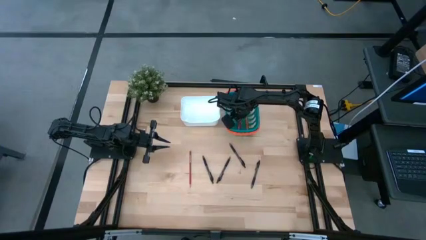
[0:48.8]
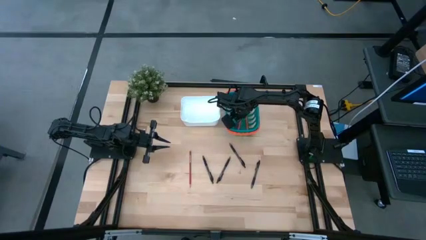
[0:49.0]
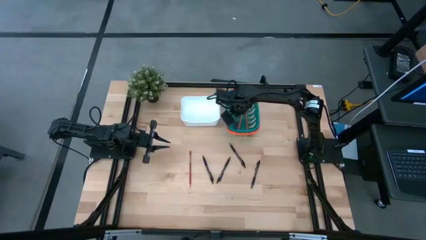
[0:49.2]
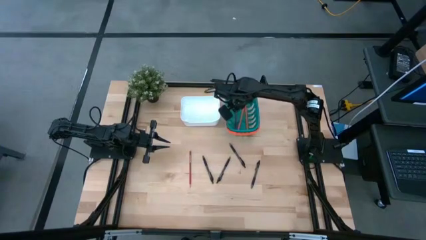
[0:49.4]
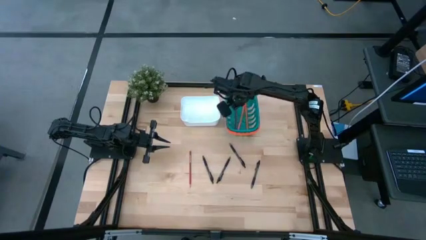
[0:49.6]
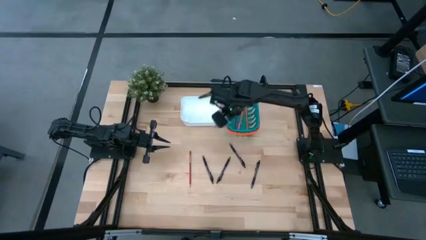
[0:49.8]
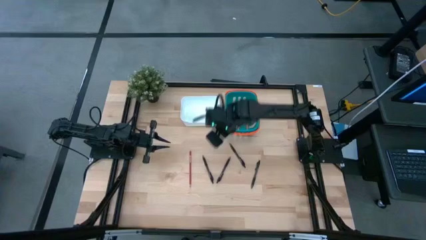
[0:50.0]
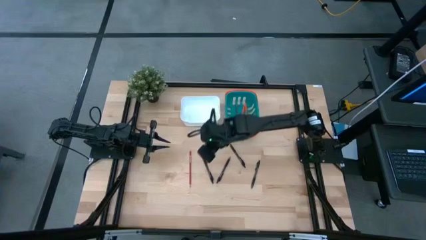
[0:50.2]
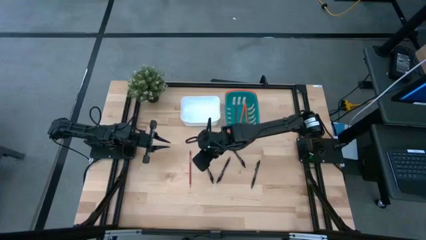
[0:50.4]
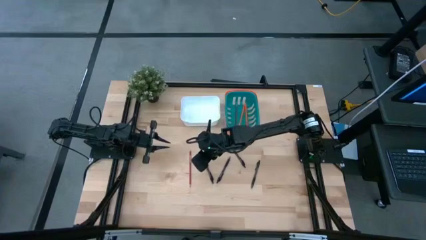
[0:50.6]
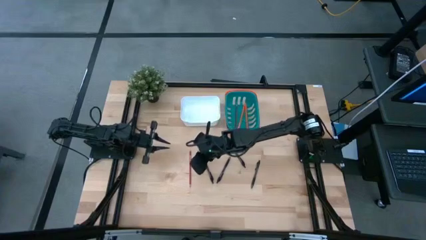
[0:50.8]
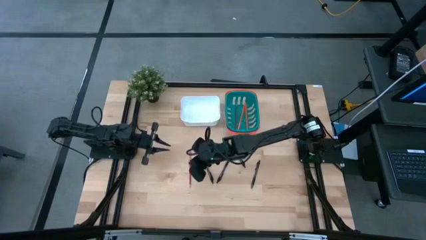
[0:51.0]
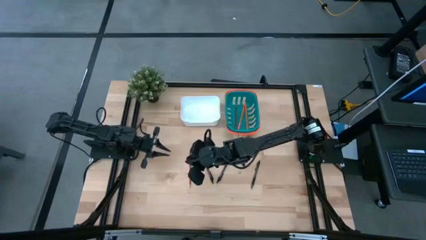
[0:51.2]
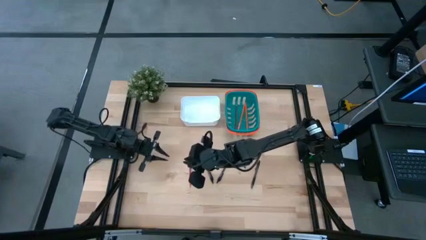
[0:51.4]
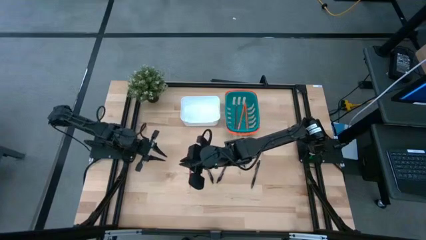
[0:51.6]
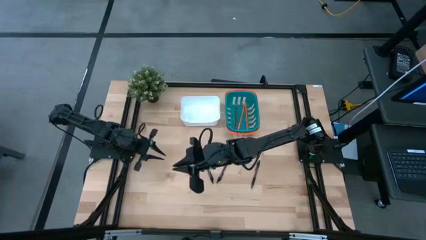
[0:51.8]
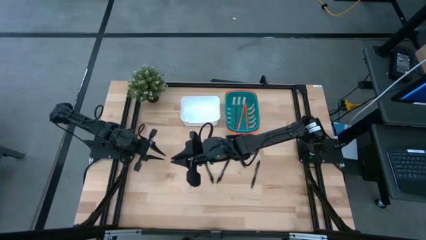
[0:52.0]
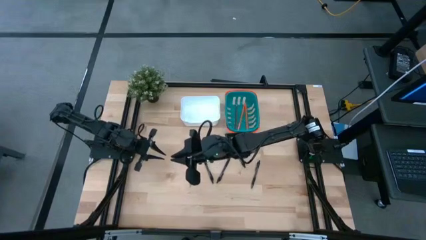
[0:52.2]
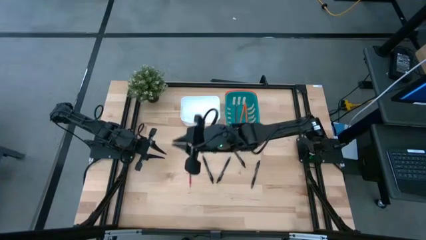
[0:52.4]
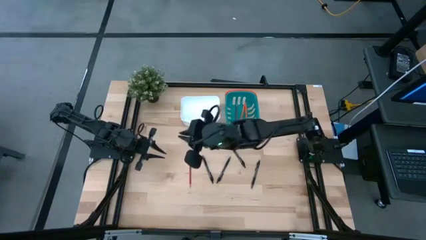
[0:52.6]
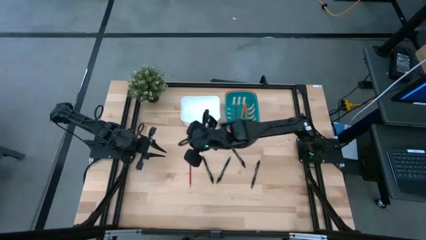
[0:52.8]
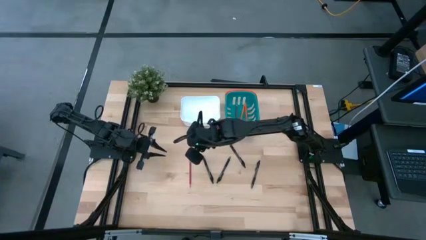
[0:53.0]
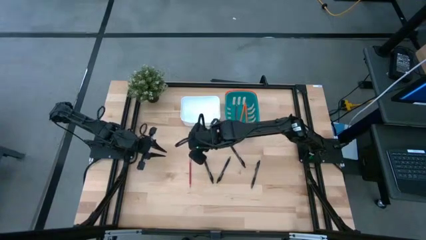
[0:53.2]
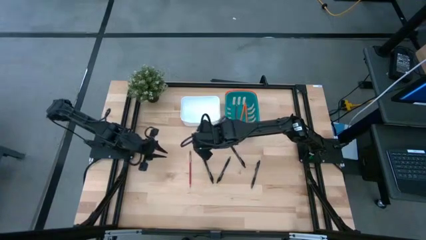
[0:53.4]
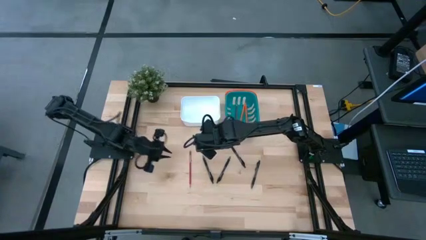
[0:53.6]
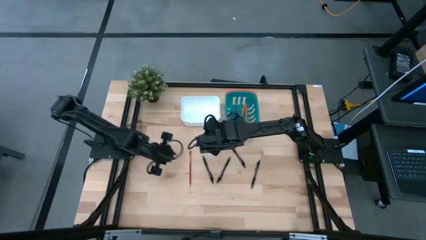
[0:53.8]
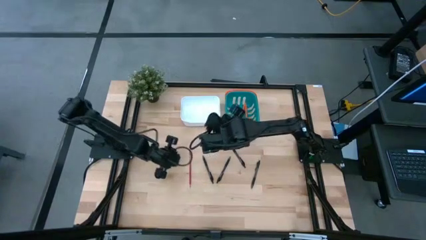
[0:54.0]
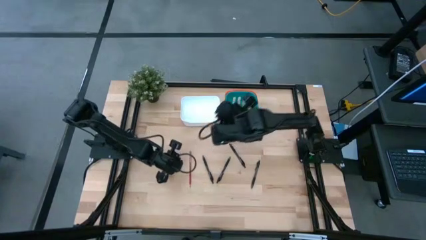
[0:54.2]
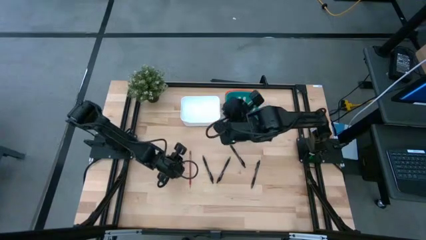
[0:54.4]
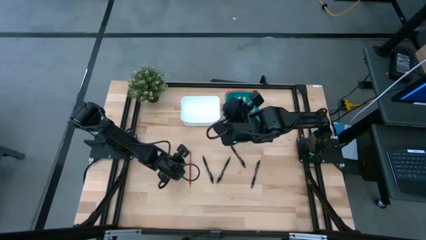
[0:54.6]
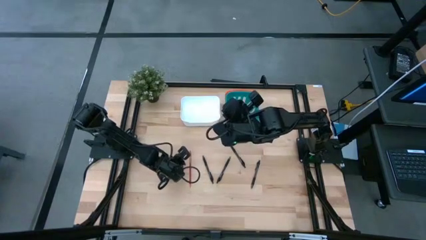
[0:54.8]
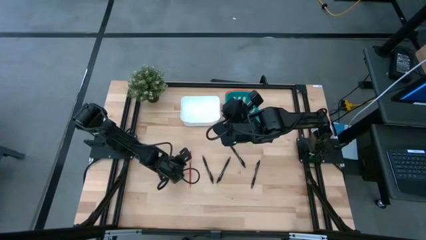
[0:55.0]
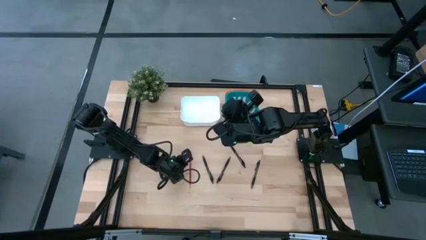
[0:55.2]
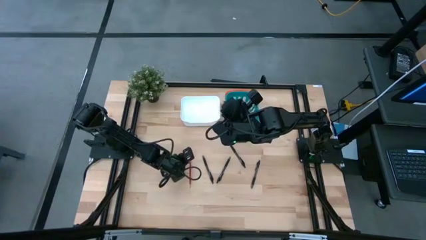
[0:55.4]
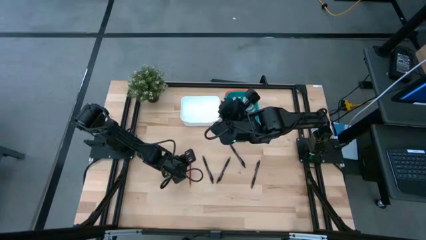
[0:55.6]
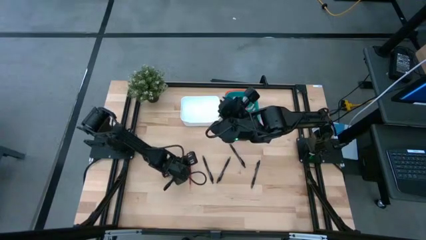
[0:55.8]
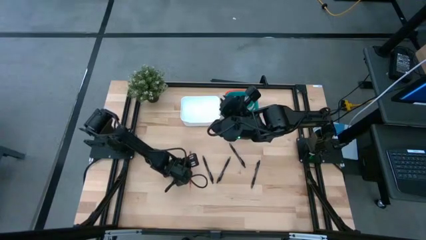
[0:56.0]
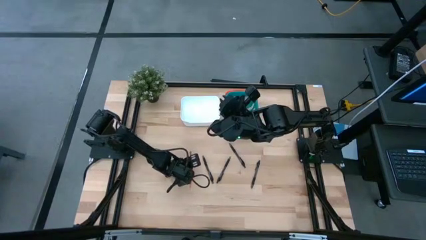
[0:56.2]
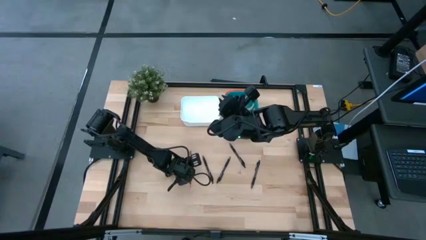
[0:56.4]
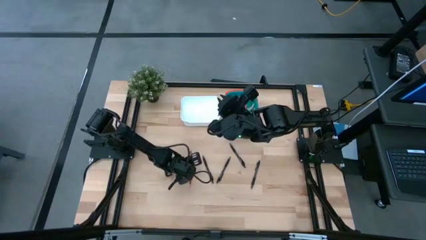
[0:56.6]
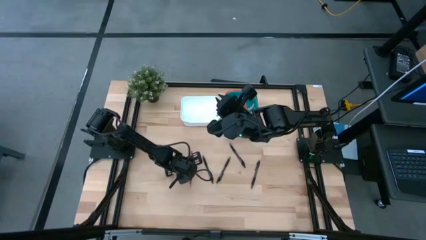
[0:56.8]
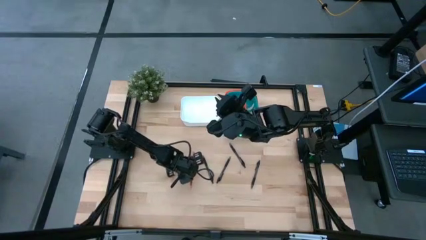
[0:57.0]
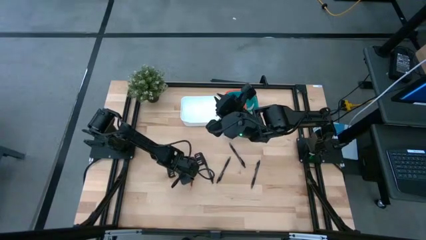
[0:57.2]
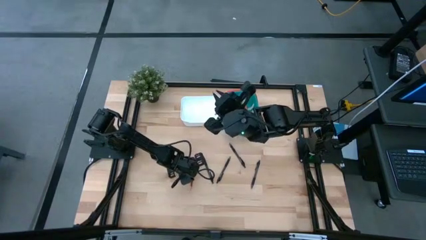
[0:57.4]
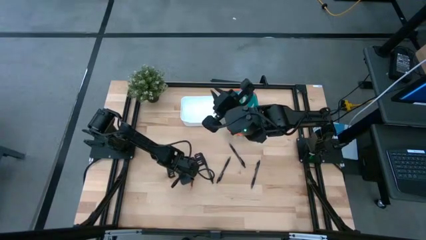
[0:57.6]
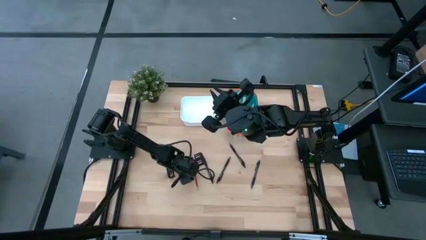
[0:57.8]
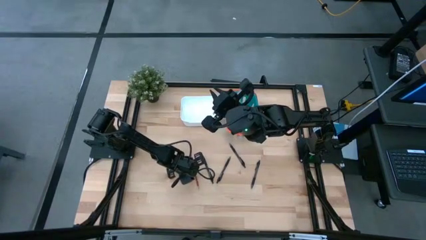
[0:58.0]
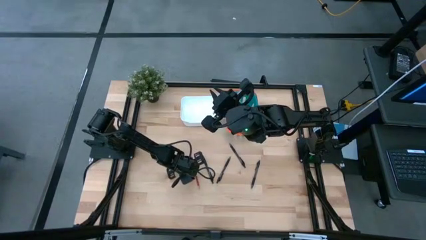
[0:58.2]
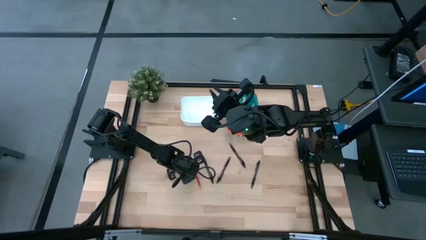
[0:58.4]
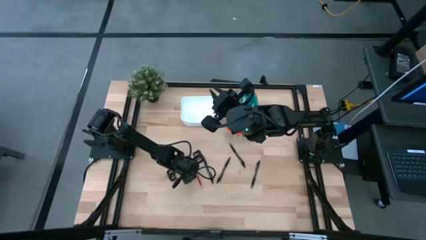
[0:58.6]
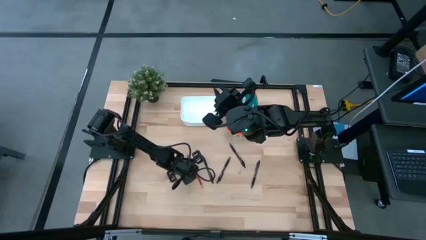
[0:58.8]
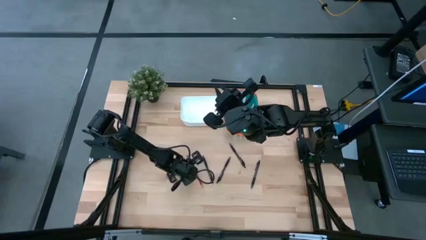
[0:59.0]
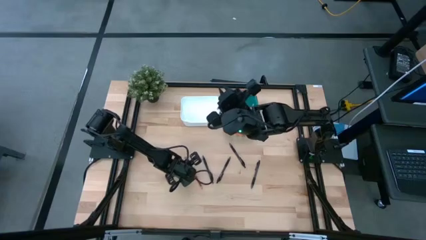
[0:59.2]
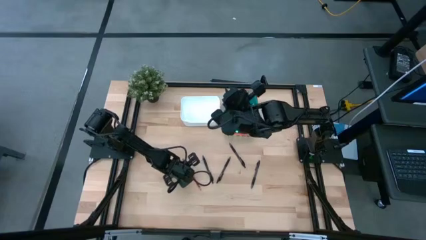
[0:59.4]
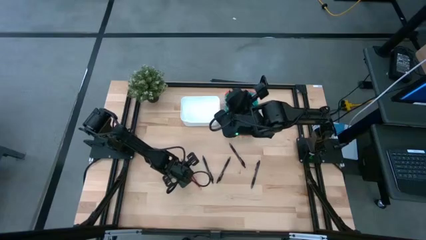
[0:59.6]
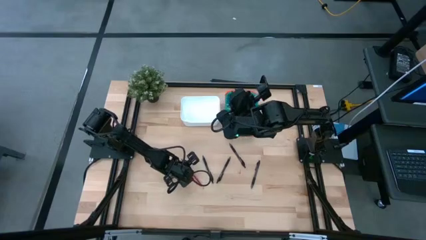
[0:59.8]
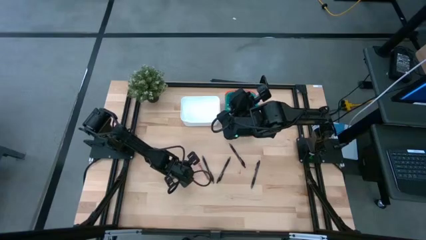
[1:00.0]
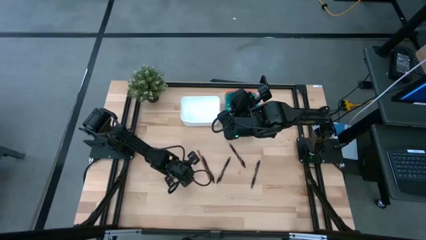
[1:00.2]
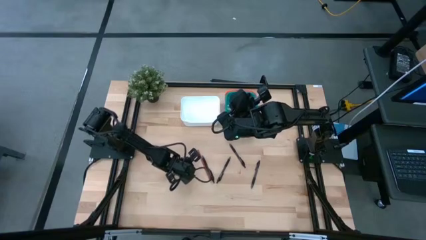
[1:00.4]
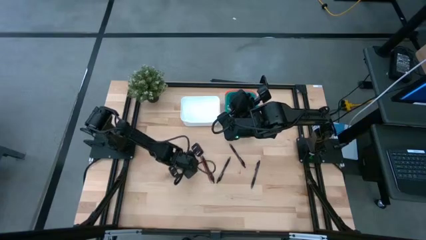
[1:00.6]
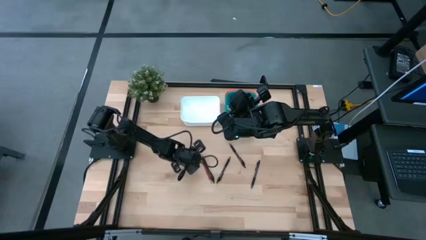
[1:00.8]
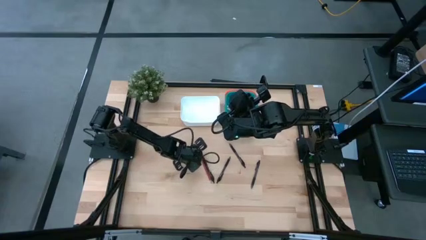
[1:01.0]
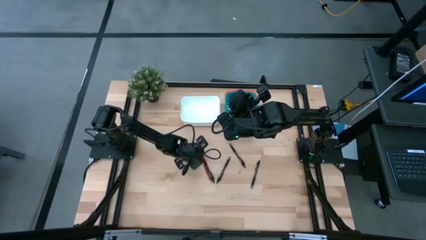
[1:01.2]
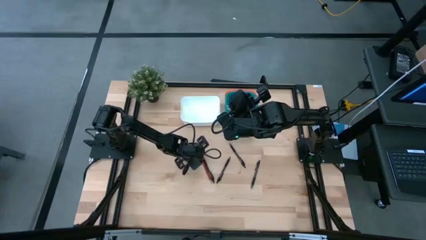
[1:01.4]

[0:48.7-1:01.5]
Task: Sort pens & pencils
Put the red pencil into the blue bin

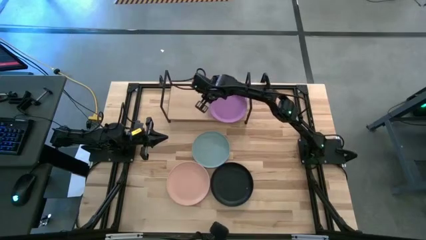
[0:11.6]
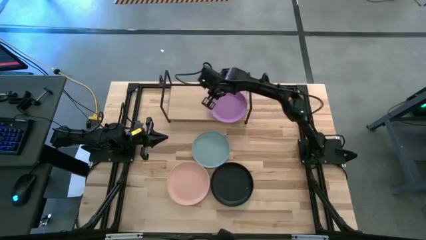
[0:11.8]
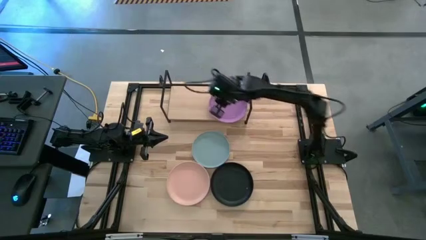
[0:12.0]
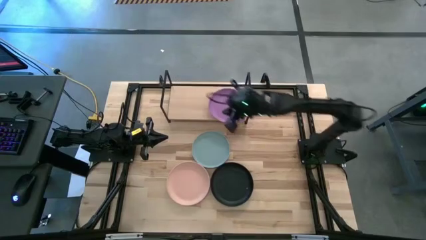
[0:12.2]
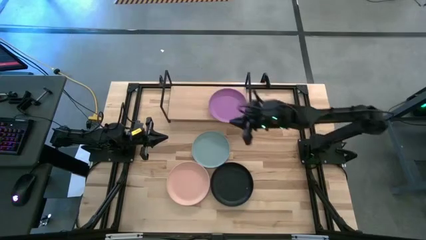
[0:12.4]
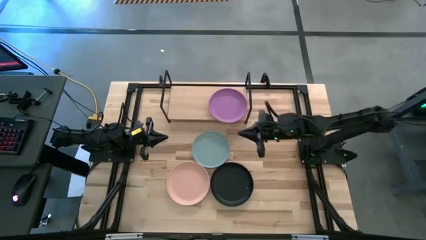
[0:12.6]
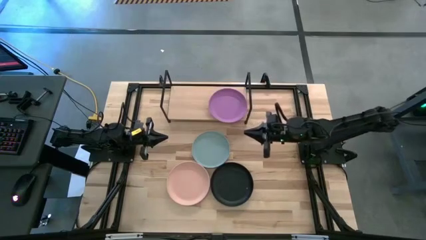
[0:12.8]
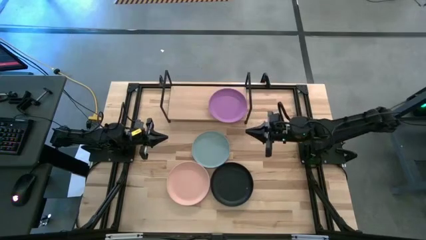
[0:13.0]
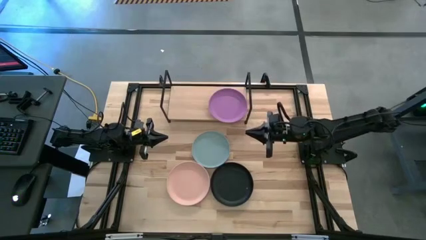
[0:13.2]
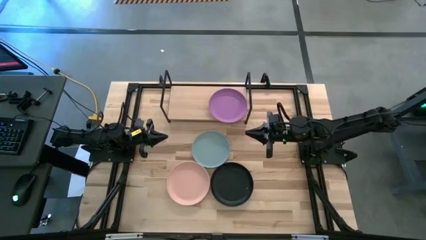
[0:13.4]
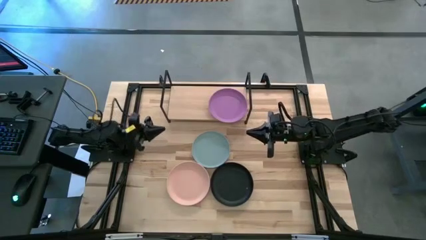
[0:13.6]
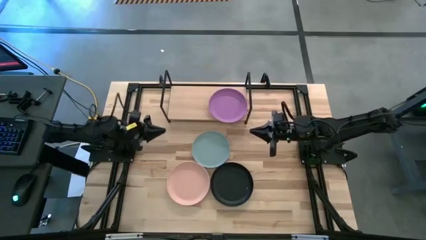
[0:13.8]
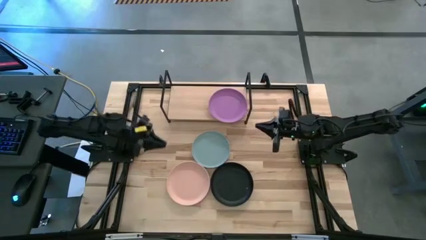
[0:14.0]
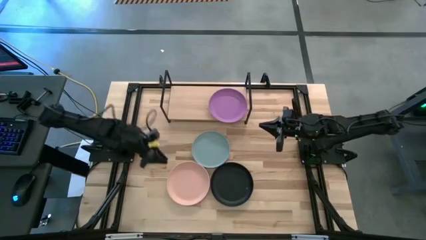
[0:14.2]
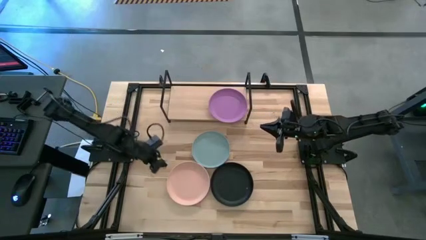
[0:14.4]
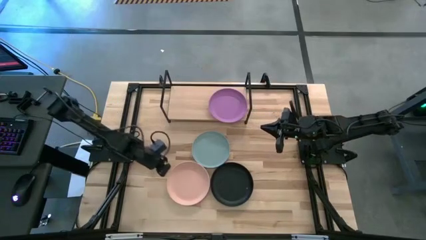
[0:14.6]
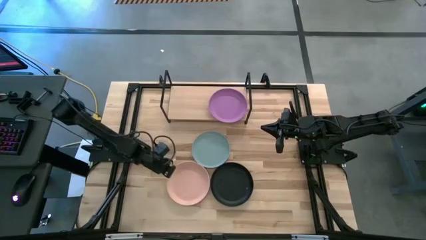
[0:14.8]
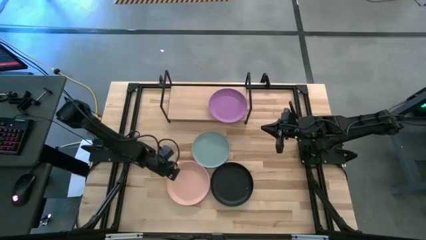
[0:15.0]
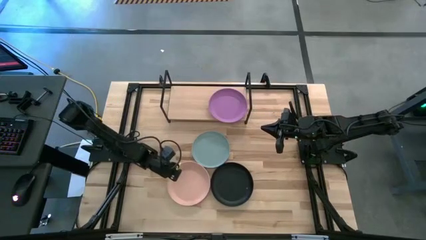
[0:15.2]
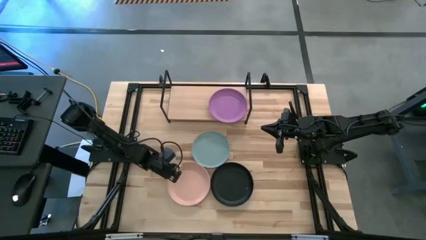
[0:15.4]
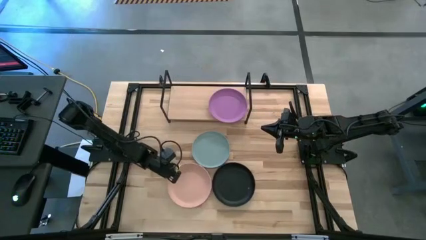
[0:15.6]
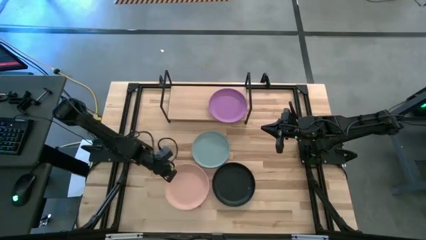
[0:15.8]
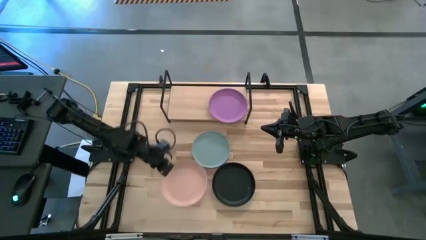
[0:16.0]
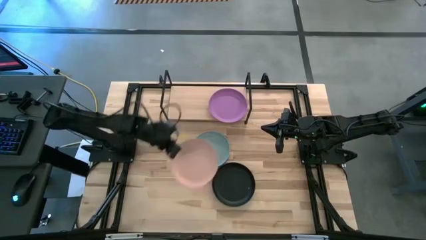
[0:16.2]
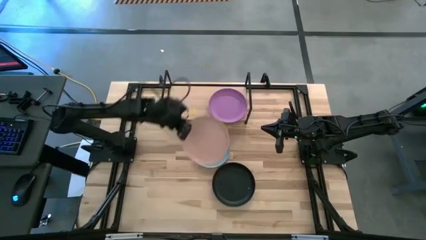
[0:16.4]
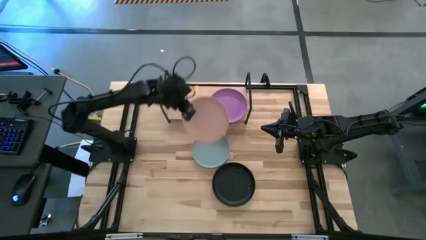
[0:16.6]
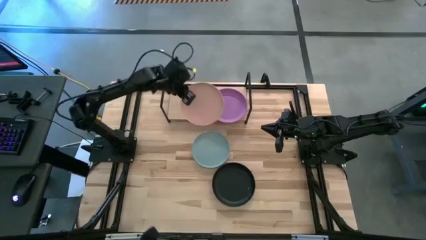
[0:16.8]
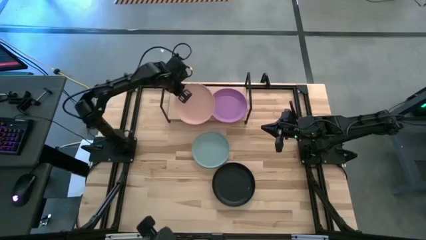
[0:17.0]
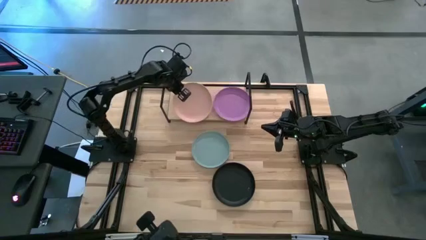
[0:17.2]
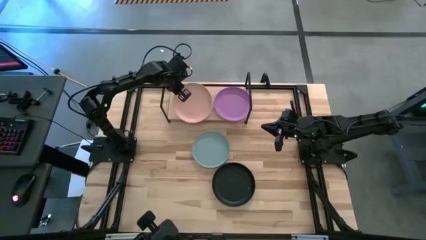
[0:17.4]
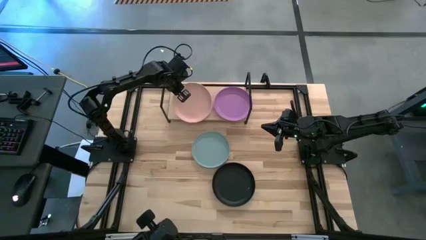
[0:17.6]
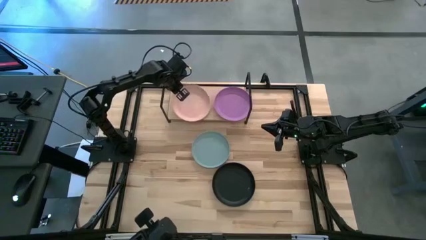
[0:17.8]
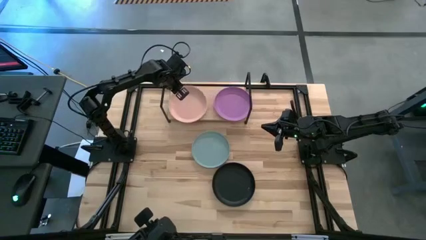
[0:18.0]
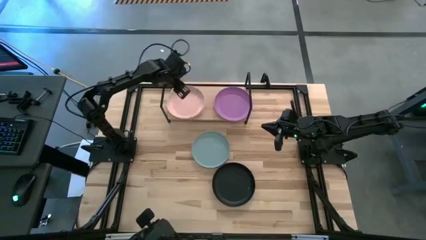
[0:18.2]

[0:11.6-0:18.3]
Task: Place and stack plates onto a shelf
Put the light orange plate on the shelf
